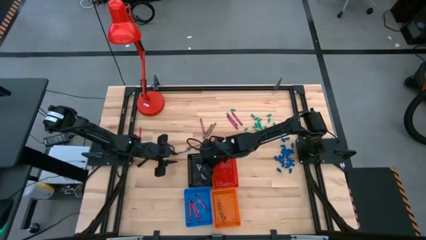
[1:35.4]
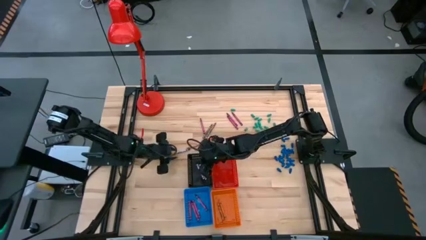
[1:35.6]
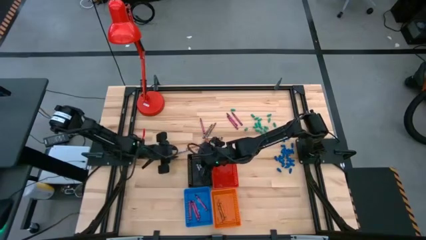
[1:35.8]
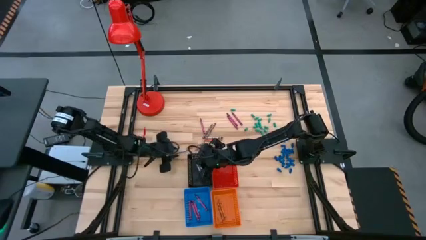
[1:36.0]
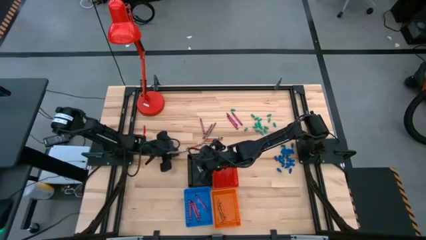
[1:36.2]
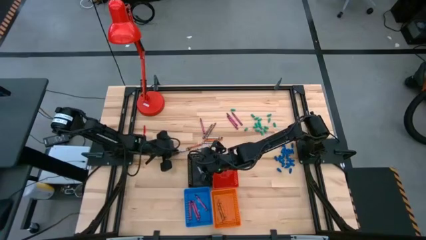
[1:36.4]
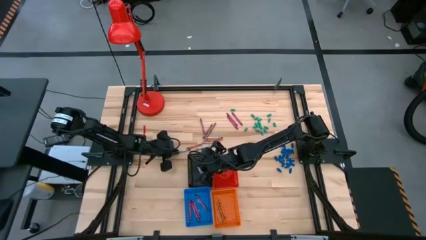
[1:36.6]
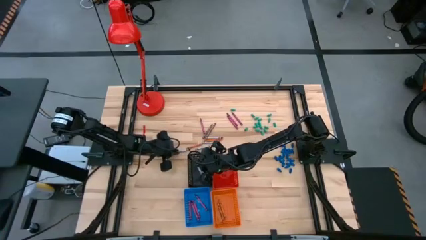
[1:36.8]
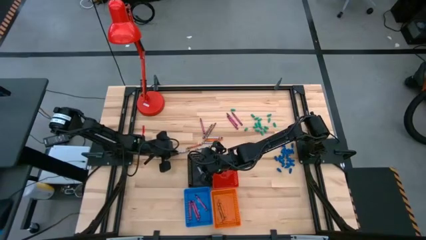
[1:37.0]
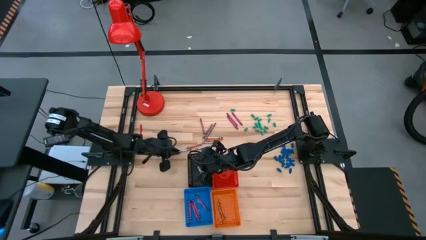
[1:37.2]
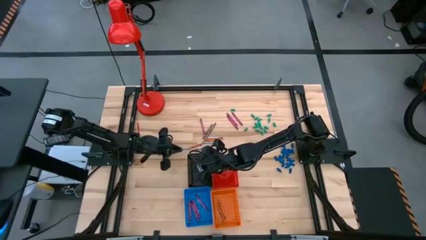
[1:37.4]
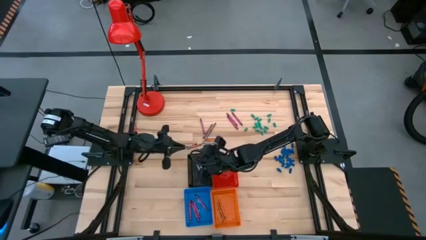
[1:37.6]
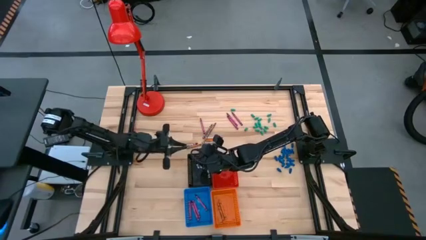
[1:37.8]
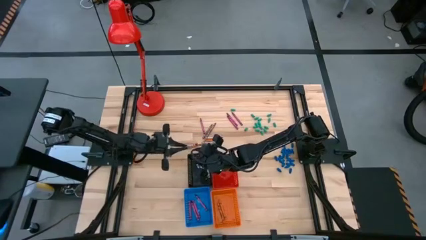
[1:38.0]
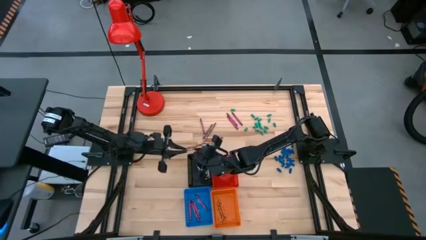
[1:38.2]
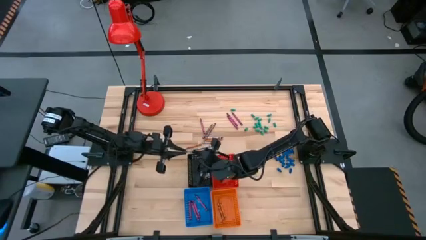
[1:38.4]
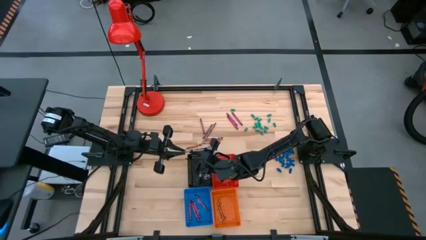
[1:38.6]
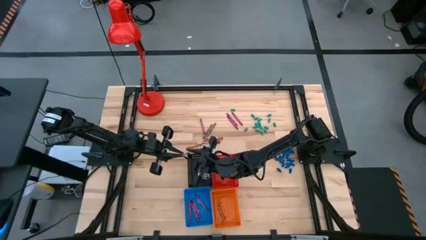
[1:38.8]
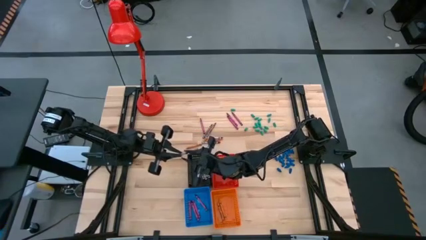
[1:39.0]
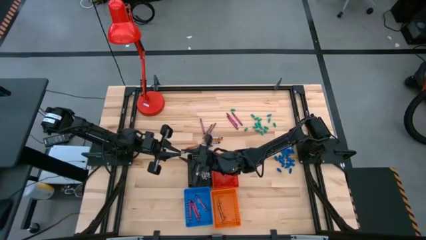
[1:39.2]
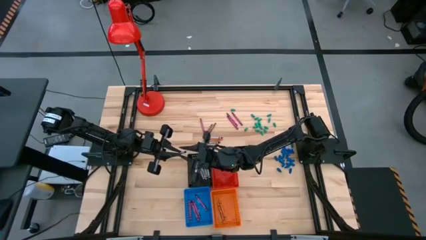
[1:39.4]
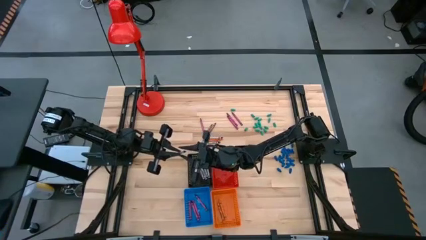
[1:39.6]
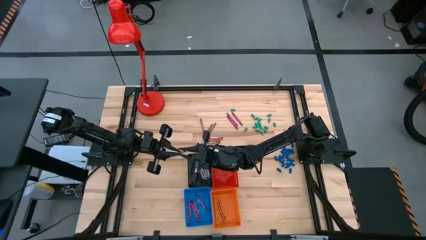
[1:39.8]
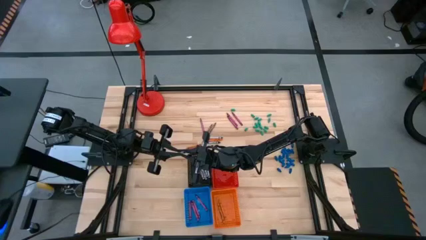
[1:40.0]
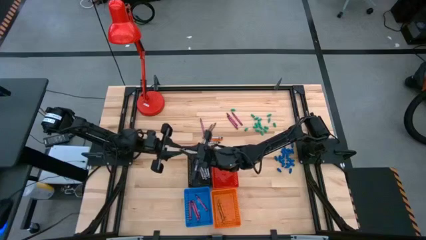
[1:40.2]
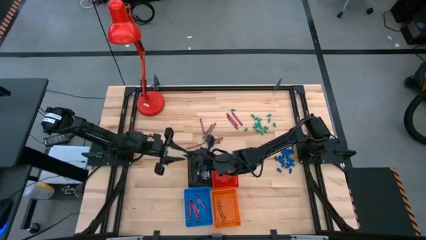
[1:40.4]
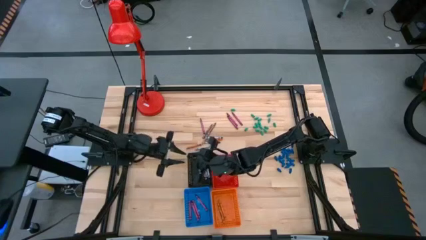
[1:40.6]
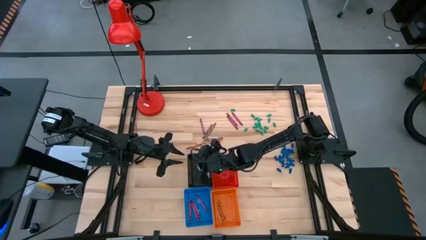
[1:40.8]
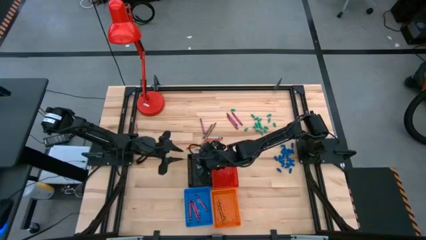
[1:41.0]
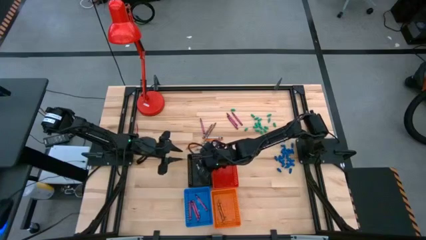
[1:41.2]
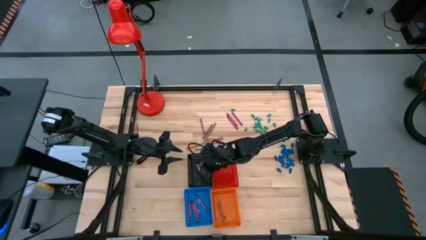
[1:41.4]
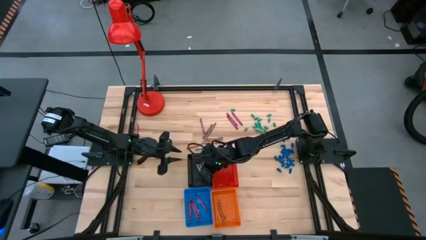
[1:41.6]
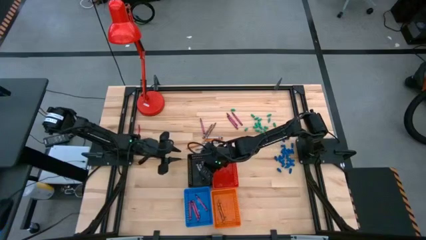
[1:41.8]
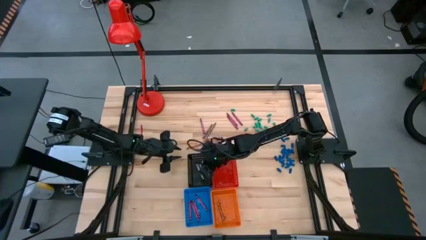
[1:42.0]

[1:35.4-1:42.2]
Task: Sort crayons
Put the black crayon into the black basket

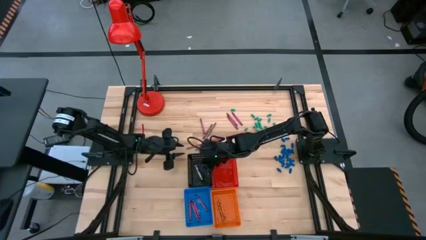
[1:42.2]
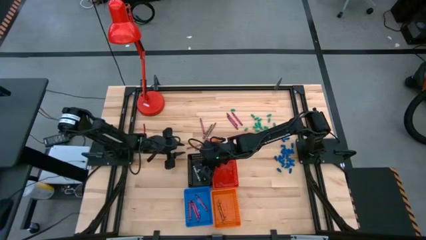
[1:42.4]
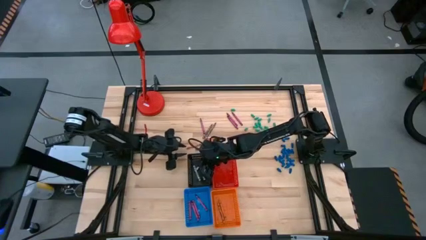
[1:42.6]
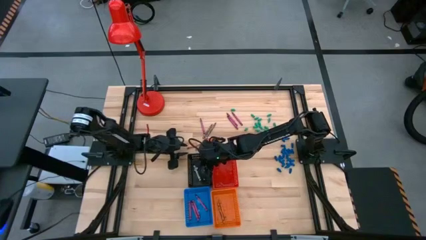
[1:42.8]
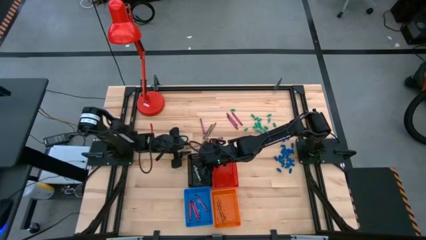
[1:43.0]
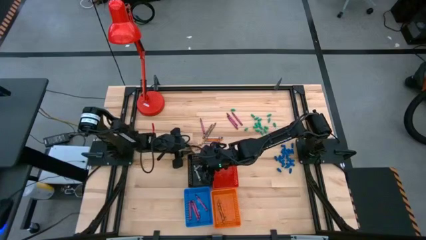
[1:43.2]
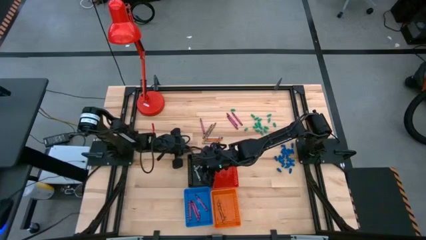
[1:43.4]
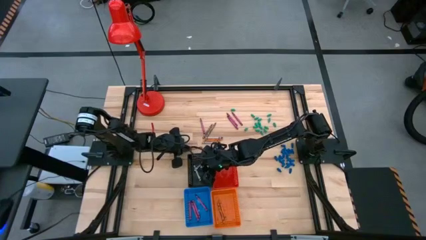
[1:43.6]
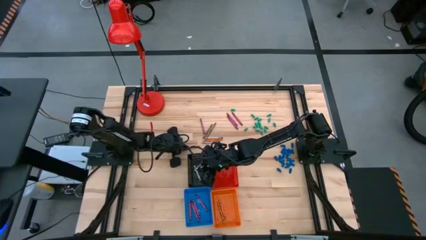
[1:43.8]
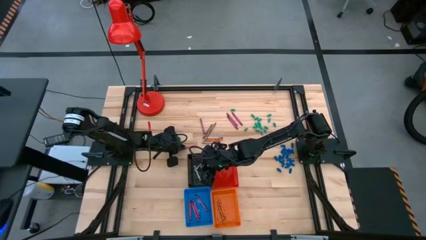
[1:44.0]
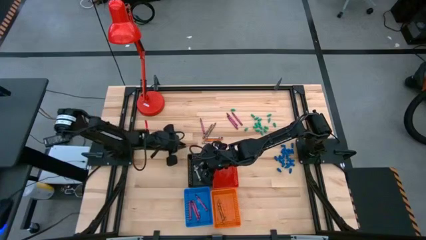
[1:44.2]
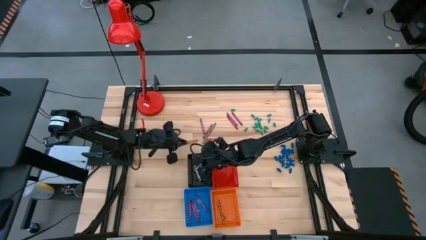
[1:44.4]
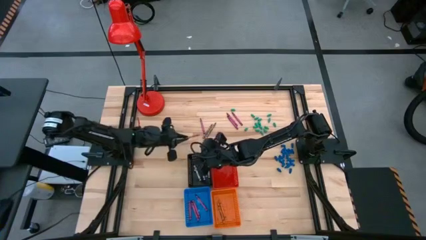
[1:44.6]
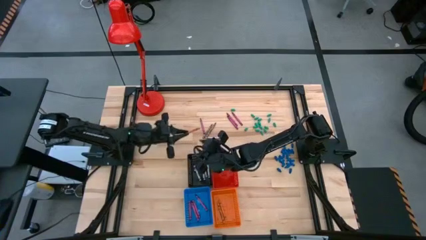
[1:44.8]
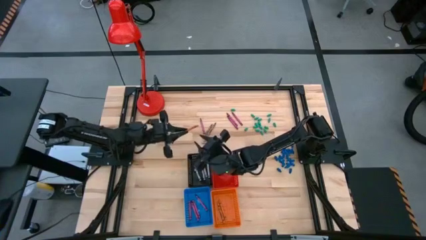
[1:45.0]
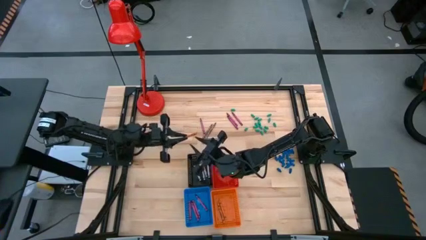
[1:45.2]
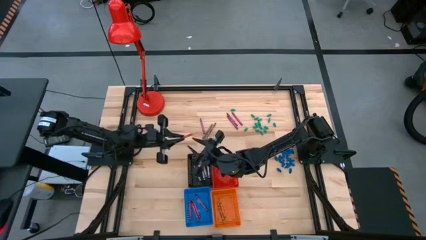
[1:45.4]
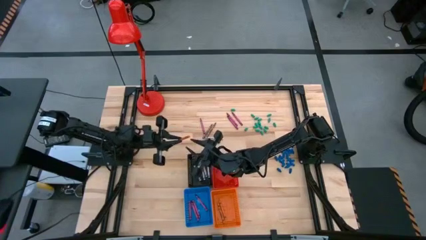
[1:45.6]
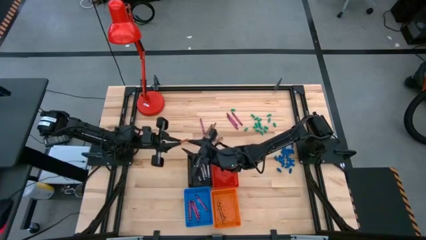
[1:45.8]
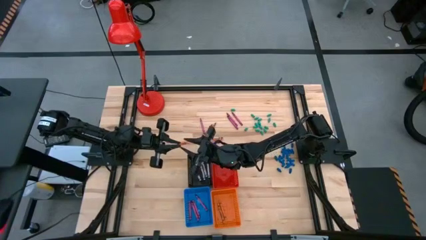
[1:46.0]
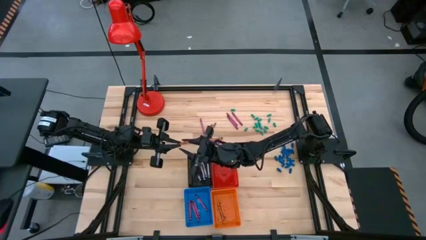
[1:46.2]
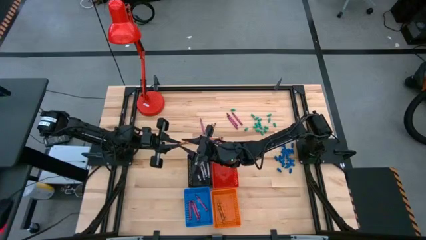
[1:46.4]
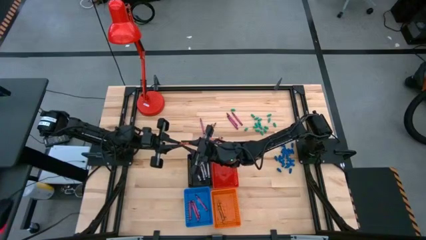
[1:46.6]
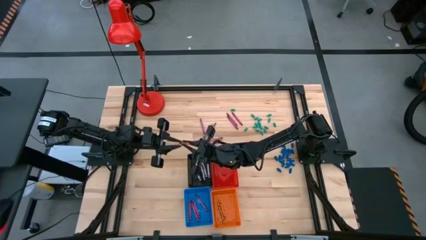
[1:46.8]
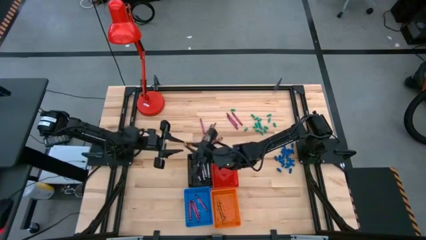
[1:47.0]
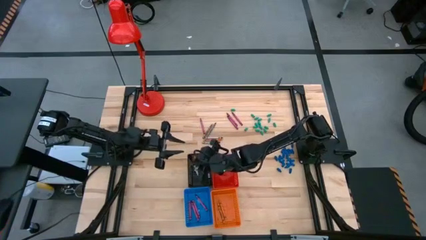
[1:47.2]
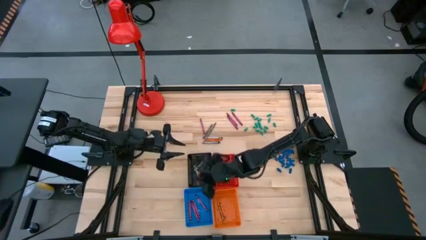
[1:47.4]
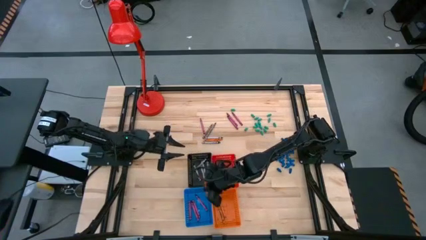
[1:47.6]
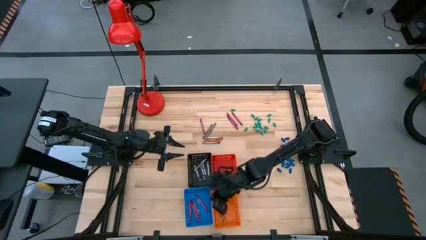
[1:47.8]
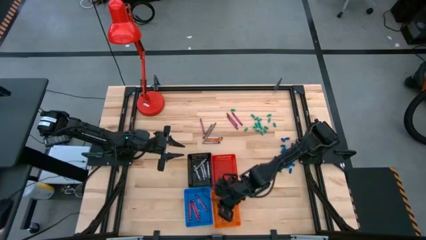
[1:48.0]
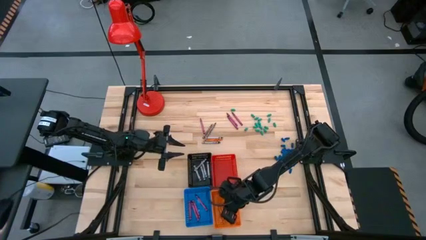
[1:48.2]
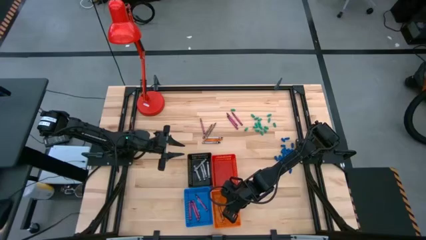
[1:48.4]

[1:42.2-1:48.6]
Put the orange crayon into the orange basket

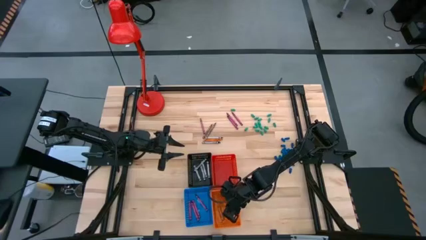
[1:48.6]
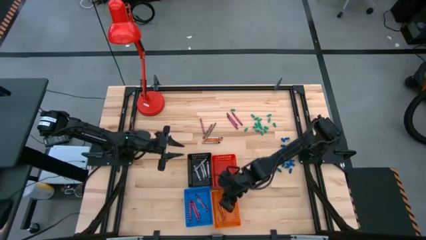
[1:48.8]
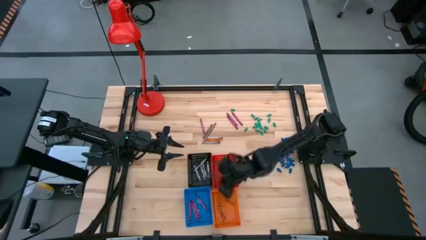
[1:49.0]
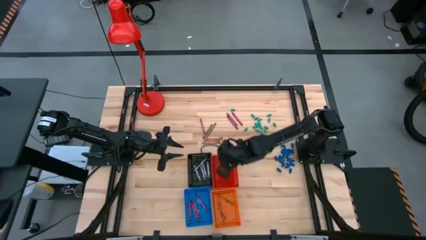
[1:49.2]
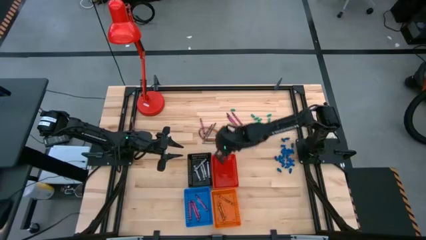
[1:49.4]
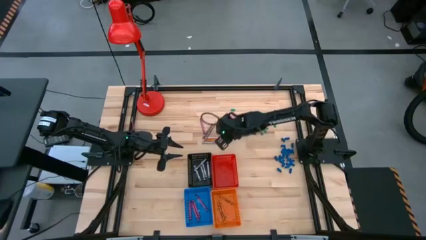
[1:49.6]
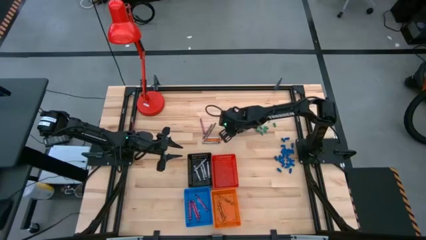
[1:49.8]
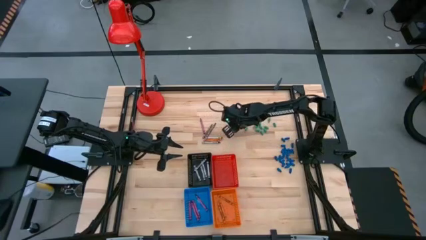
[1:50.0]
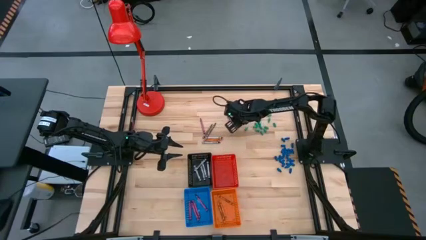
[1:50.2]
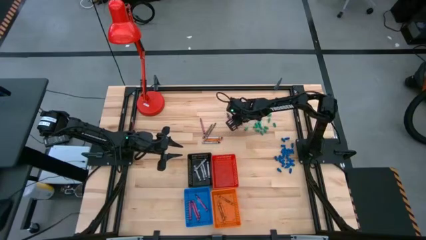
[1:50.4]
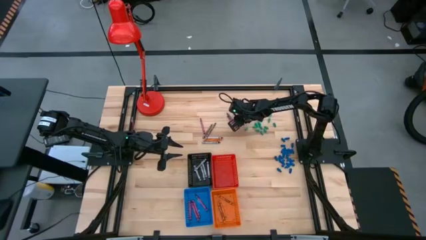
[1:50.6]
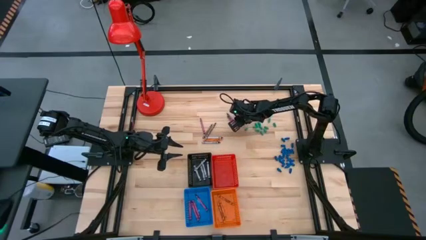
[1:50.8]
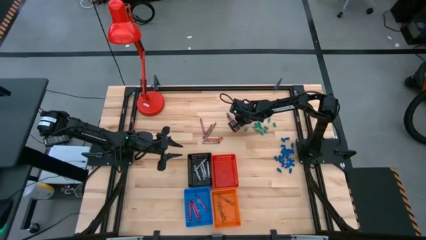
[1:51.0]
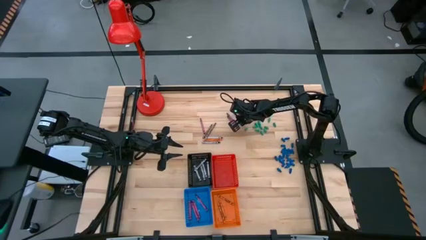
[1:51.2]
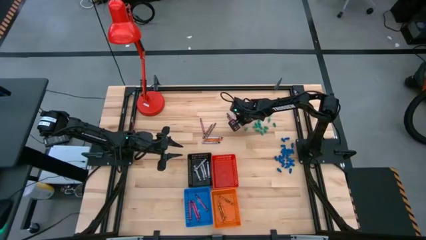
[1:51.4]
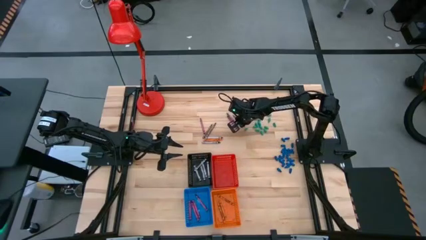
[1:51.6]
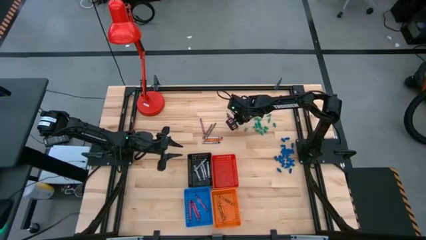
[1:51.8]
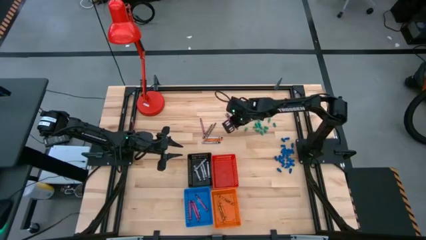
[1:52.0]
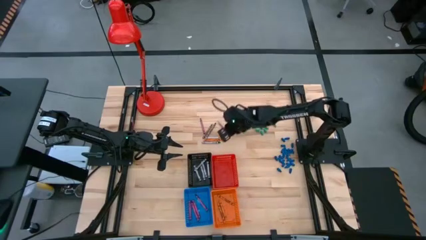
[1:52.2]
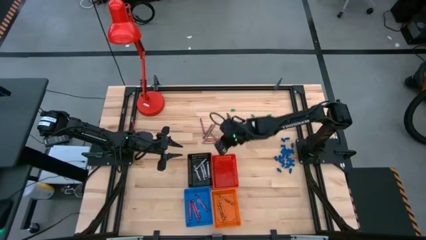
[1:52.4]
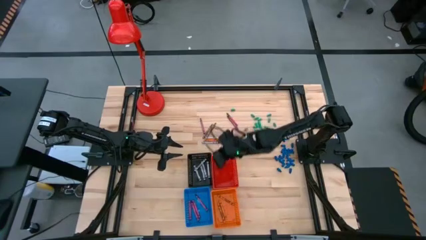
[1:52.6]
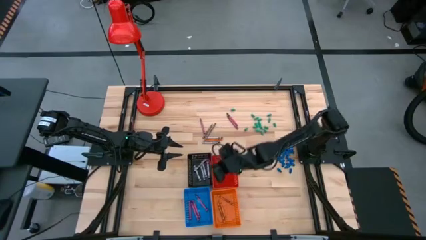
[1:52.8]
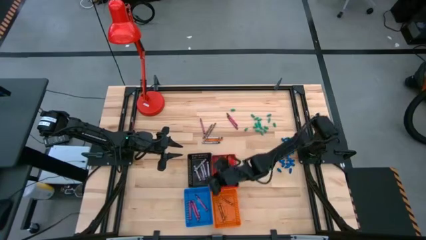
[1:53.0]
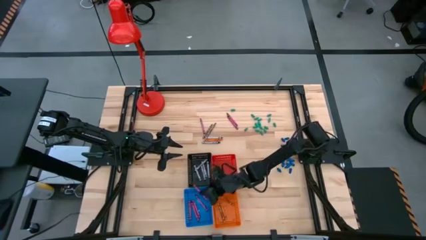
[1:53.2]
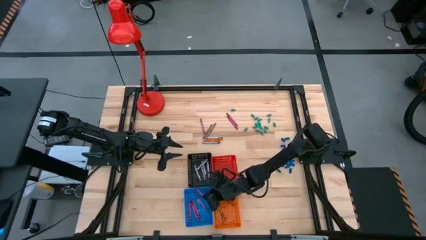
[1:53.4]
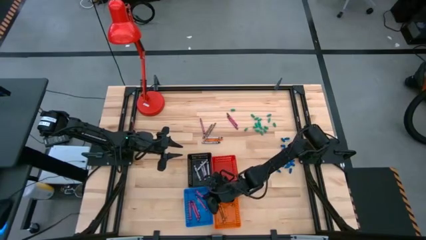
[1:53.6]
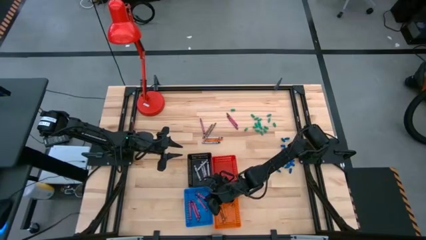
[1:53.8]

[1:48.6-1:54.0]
Put the red crayon into the blue basket
